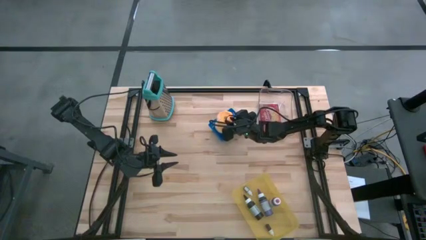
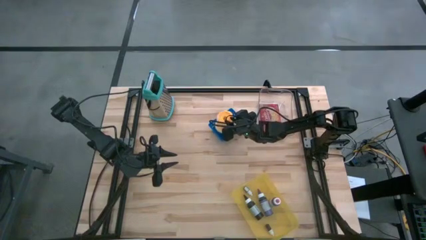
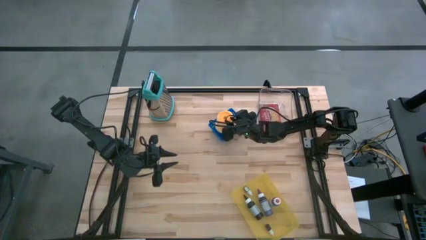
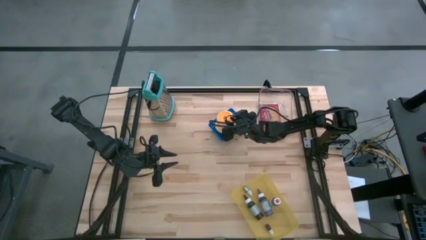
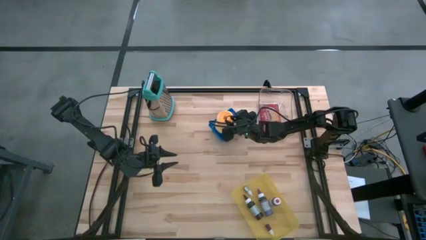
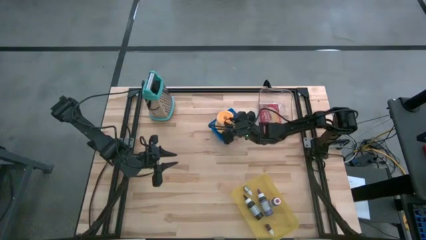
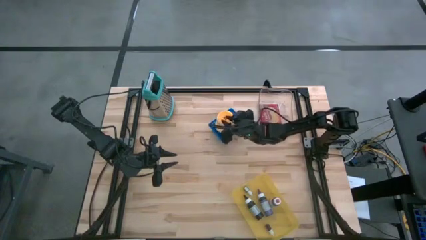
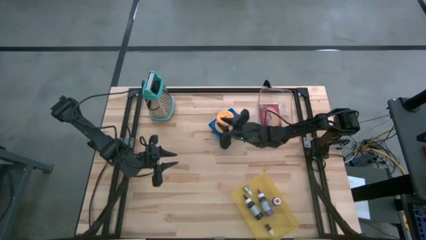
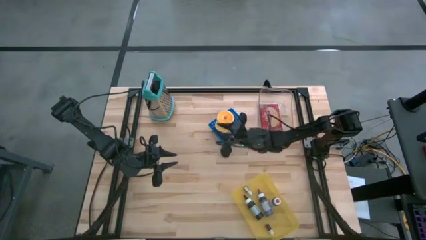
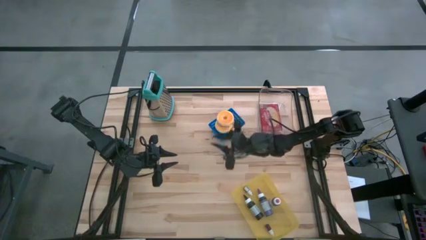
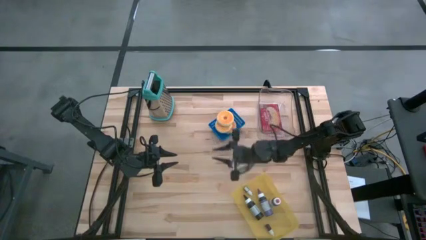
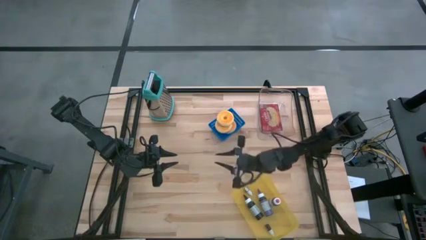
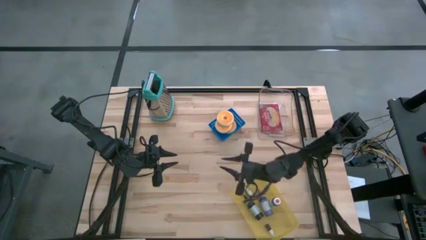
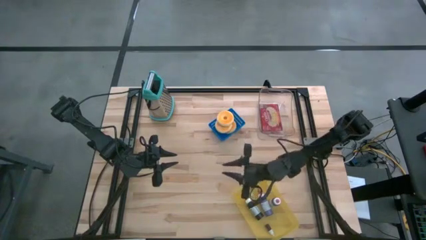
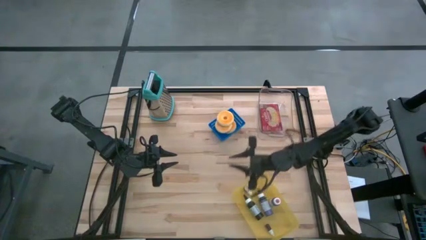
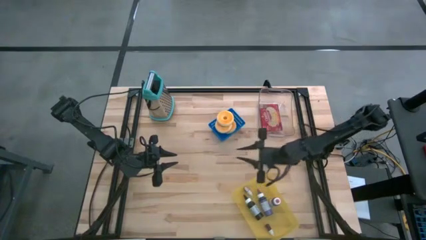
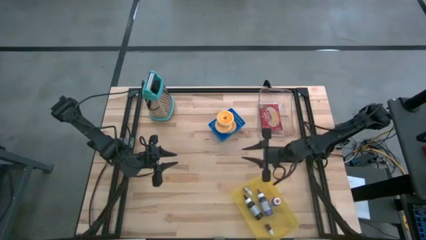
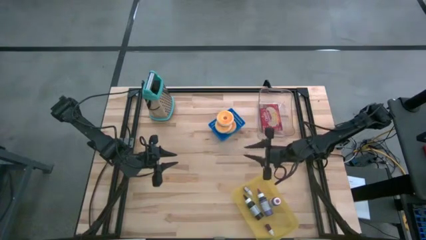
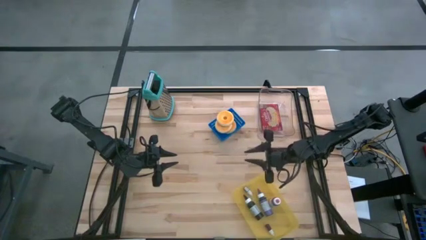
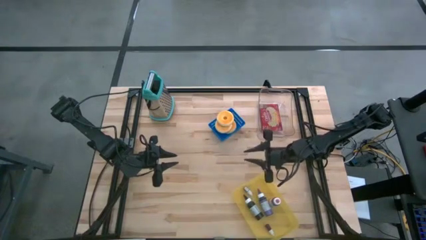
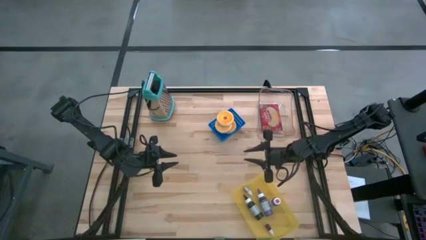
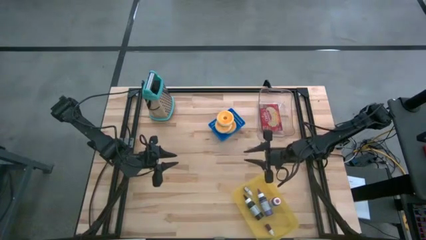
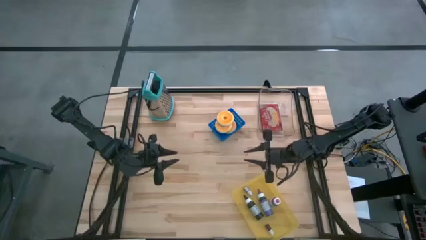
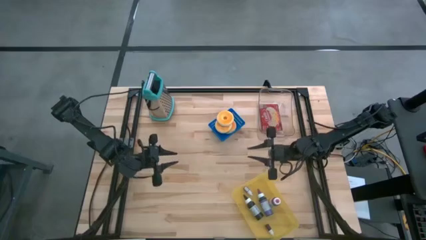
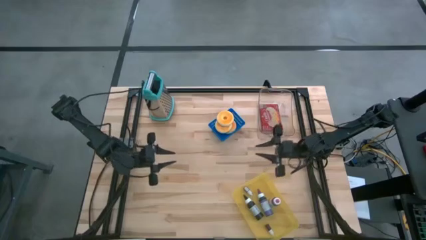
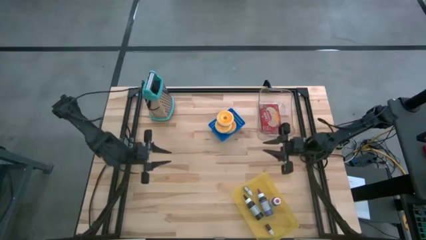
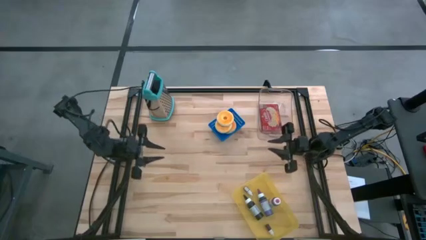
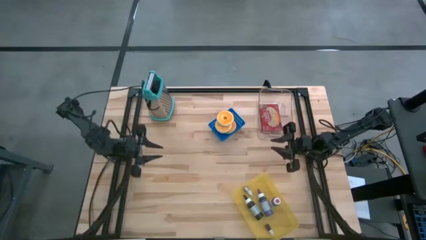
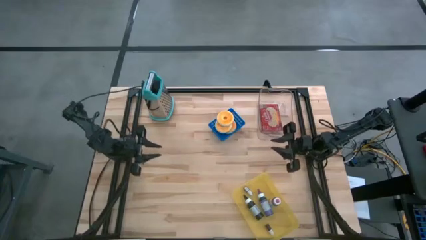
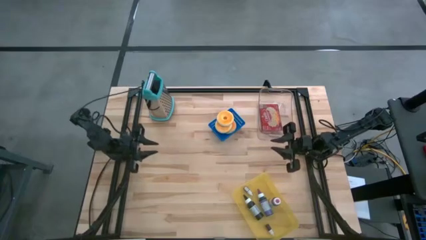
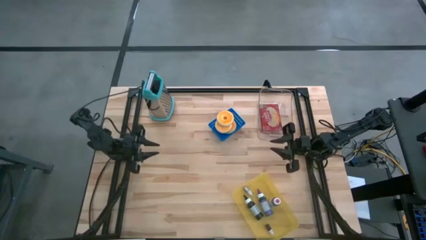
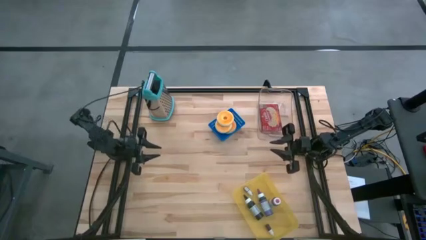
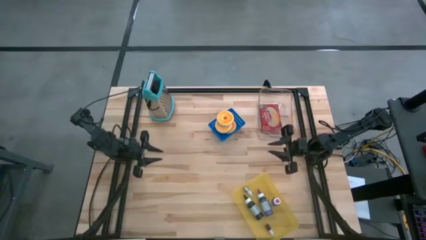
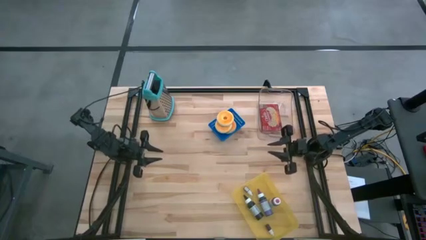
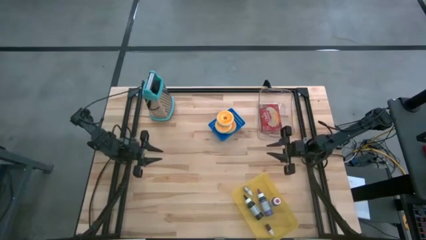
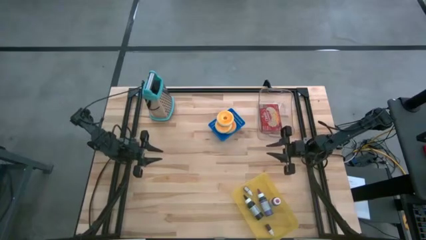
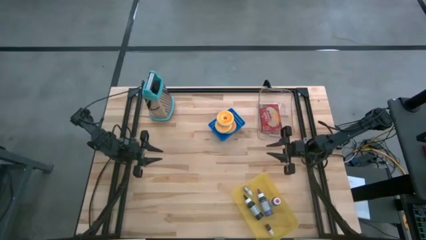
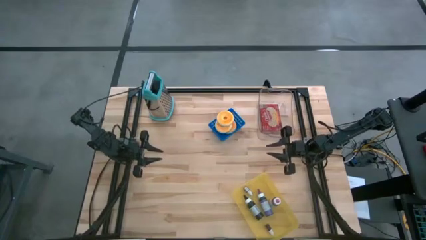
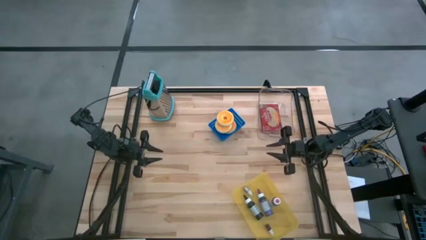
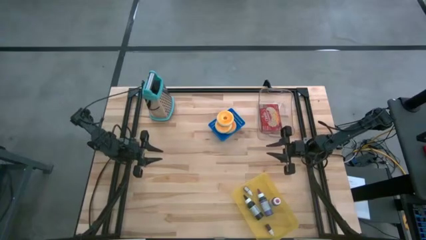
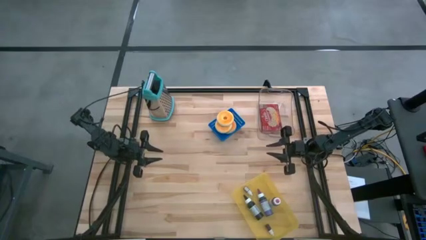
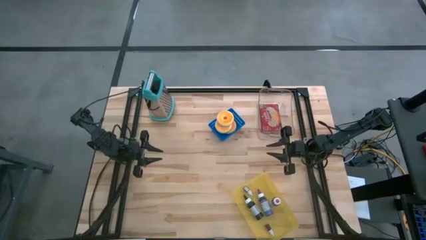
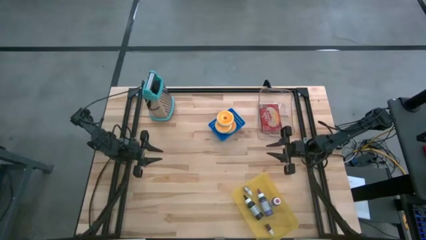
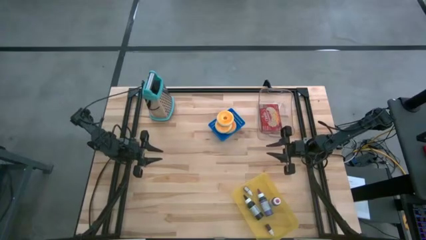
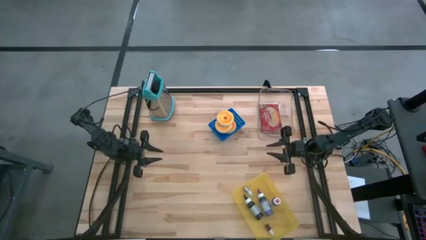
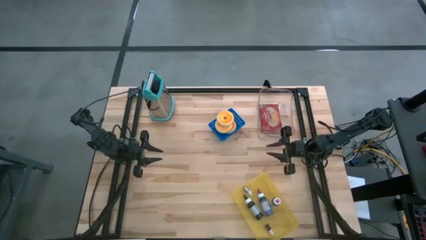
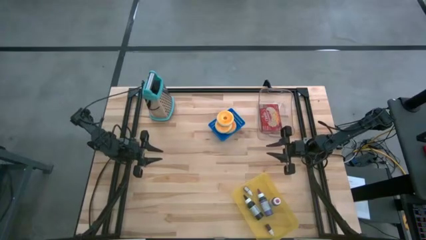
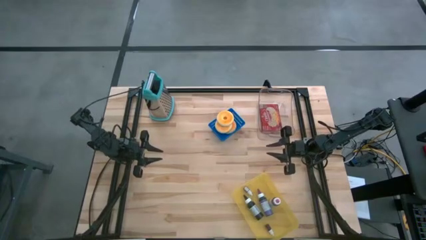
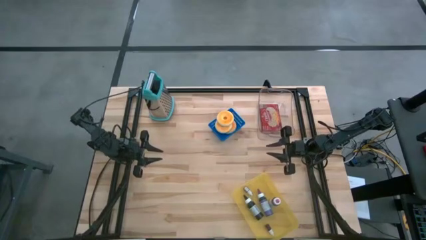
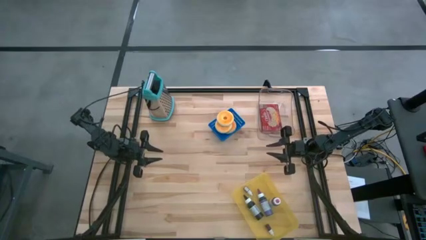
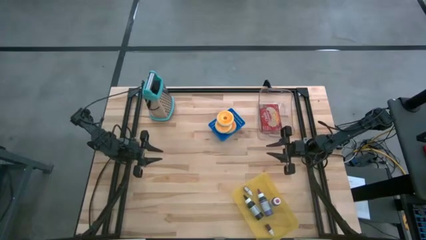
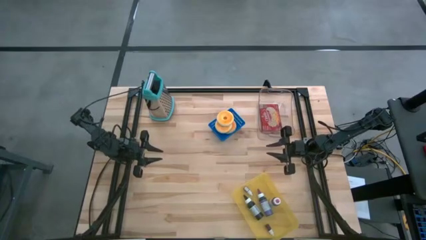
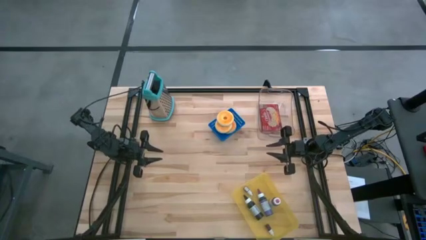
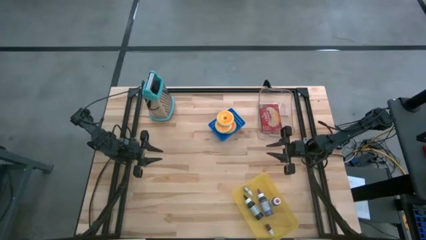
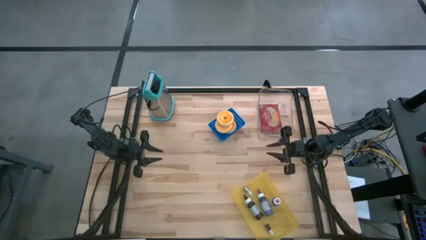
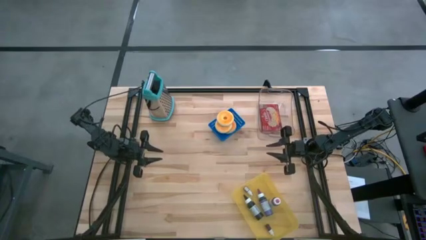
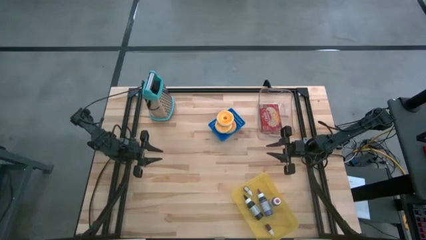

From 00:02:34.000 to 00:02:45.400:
Task: Pick & Place Food Item
Return to Home Position

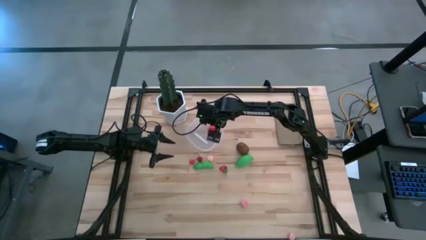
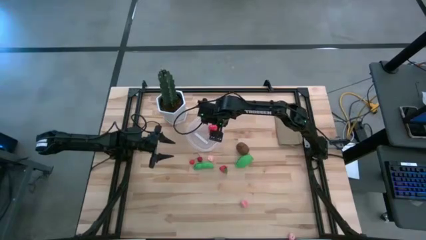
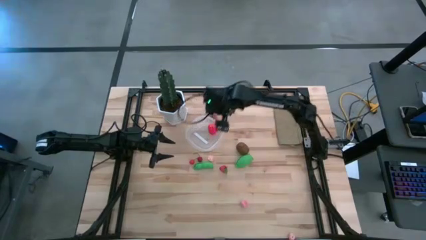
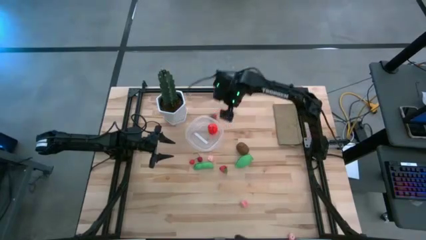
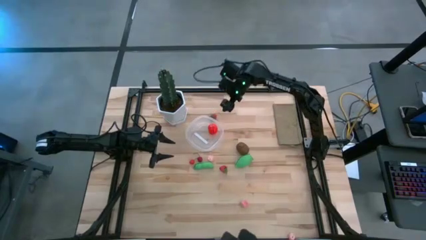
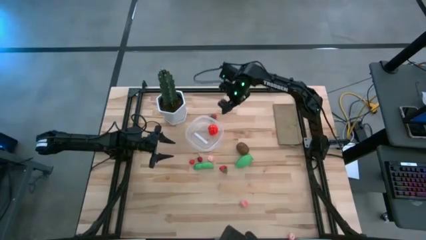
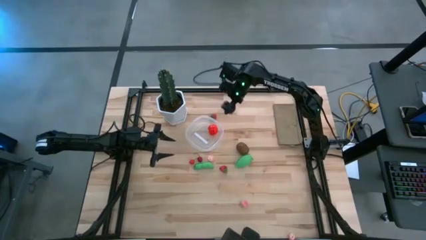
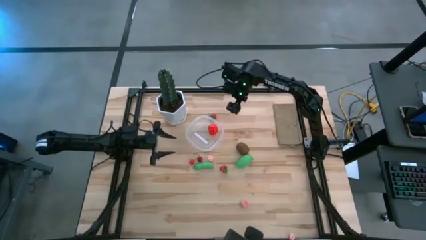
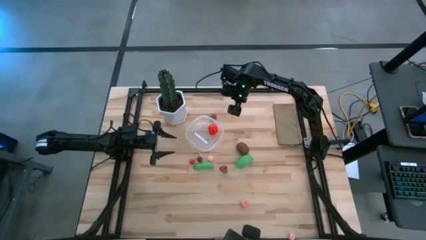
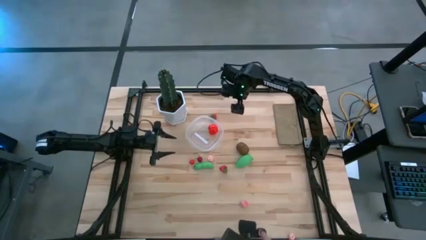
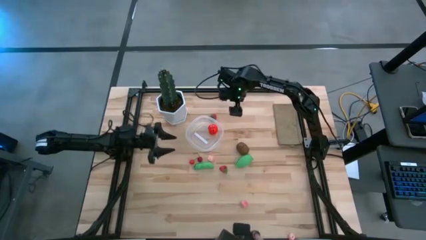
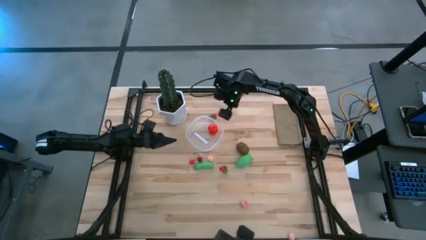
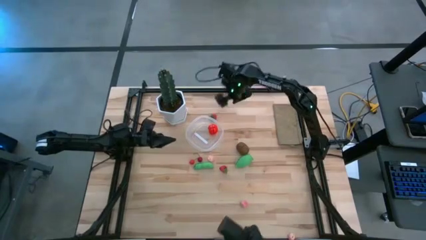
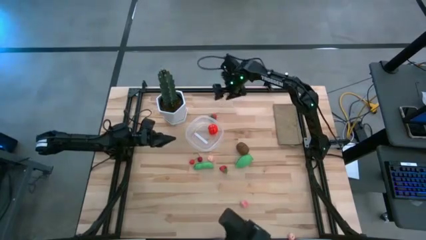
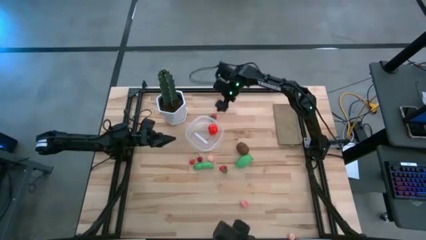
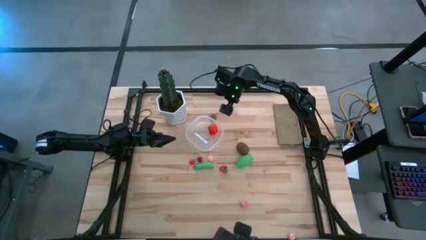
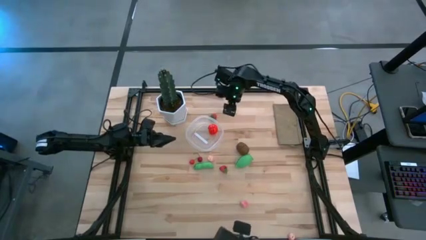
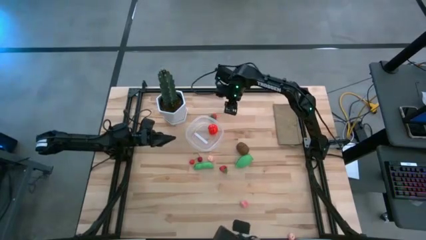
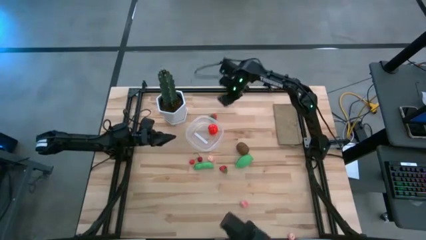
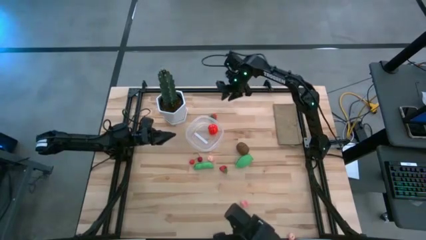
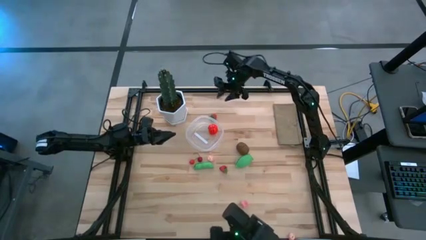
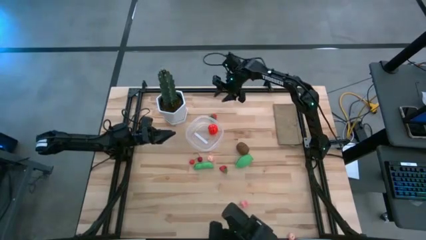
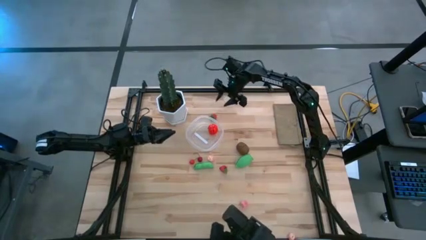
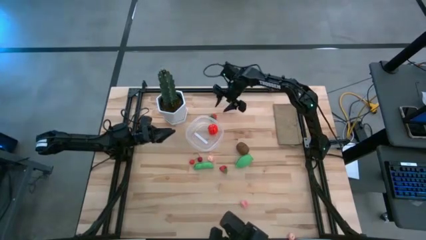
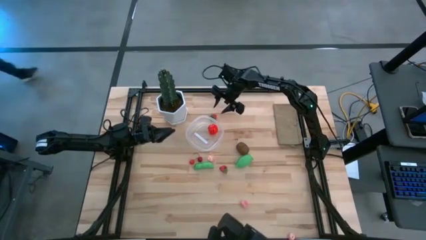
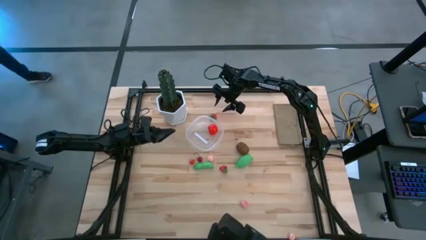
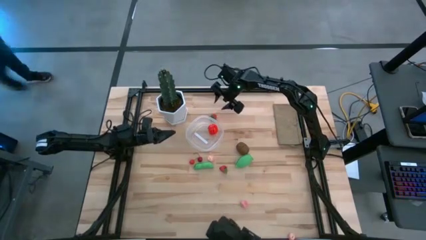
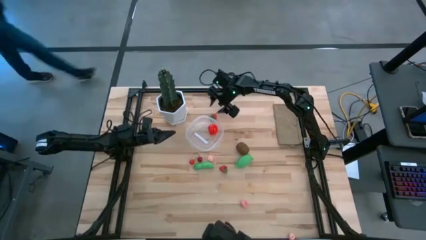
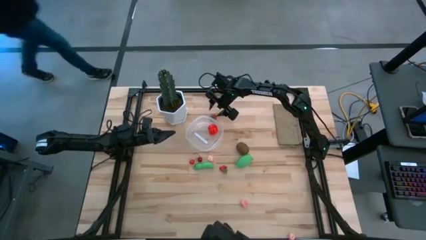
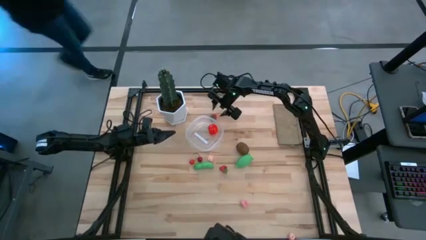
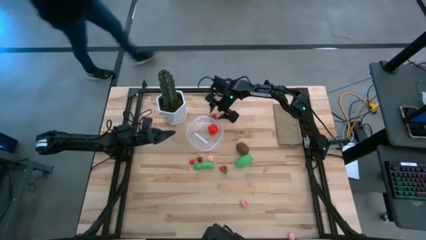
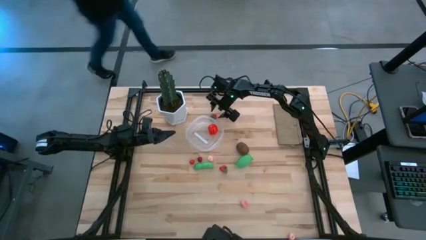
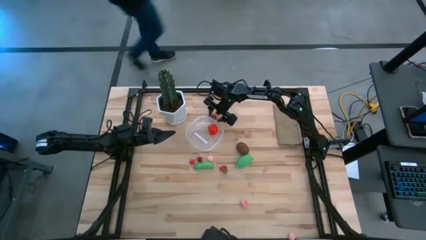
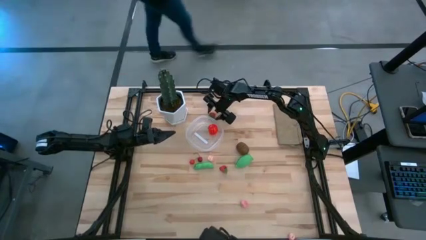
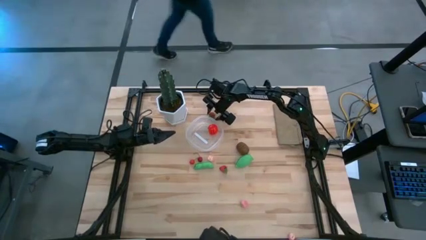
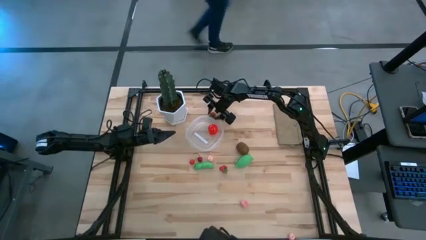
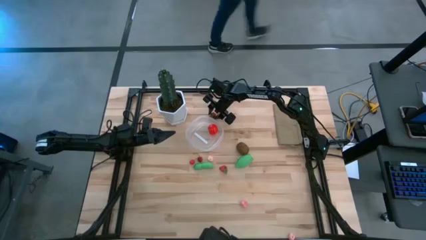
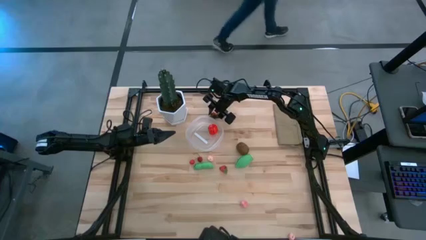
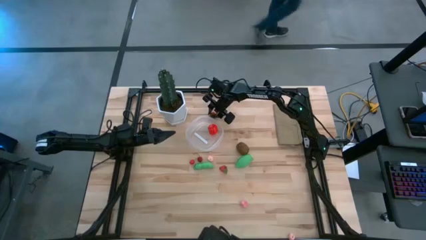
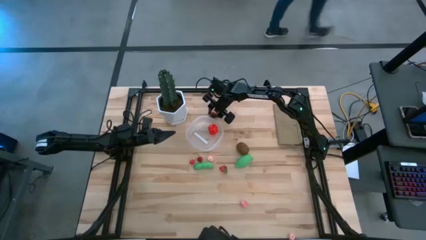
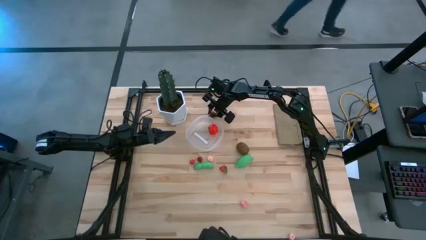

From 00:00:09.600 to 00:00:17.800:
Task: Pick and placing Produce into tupperware
Put the top strawberry into the transparent bin
